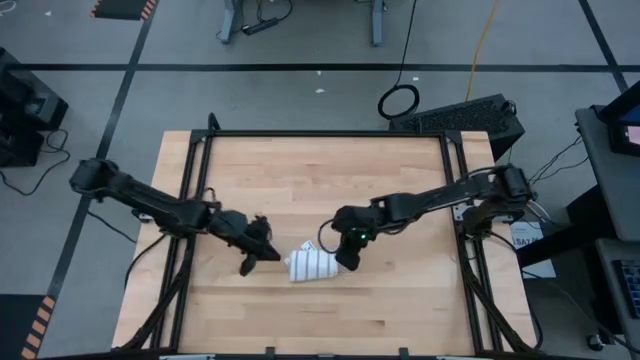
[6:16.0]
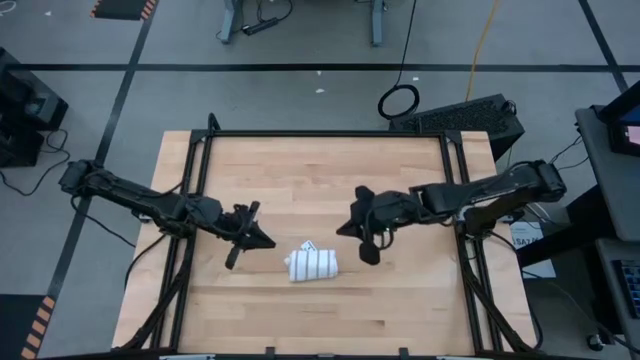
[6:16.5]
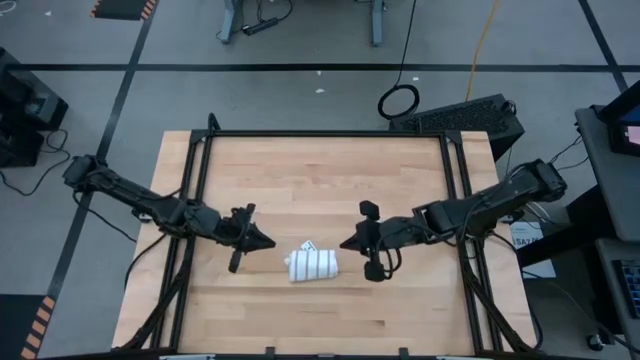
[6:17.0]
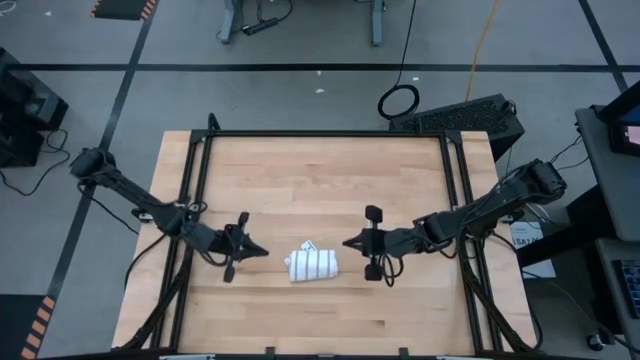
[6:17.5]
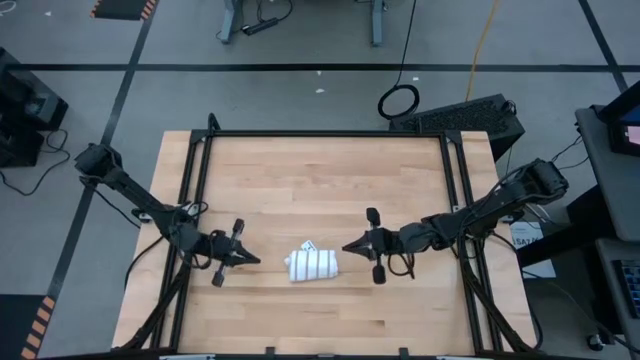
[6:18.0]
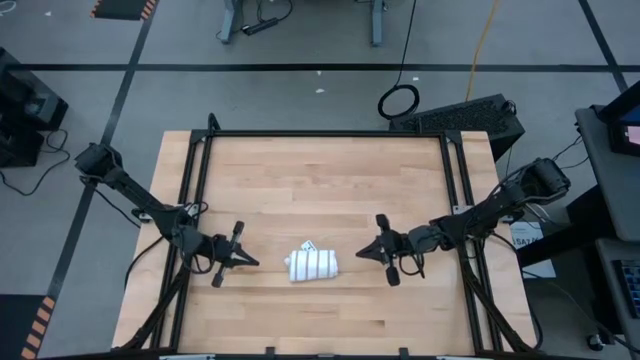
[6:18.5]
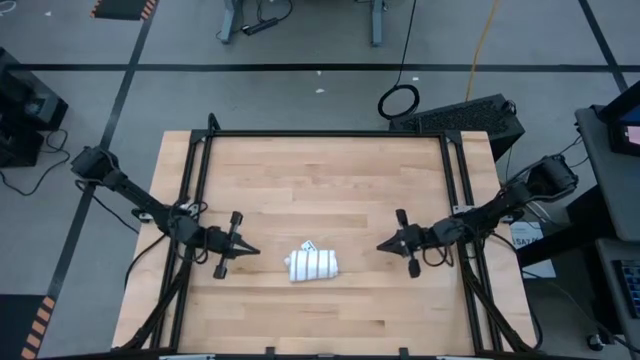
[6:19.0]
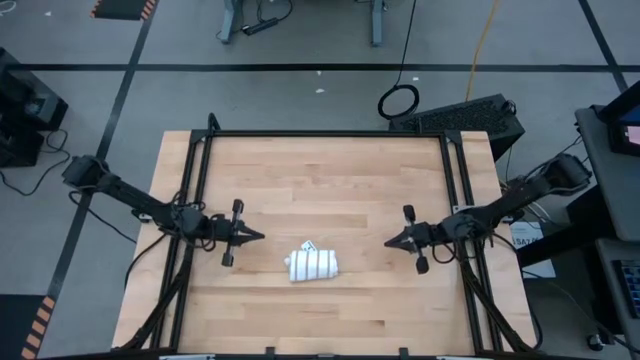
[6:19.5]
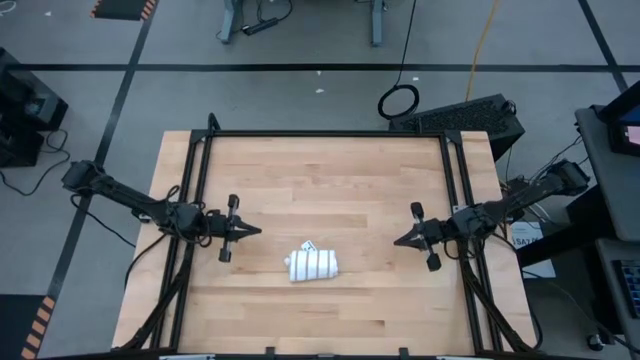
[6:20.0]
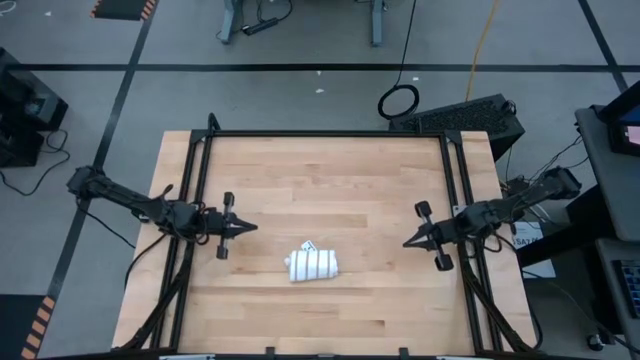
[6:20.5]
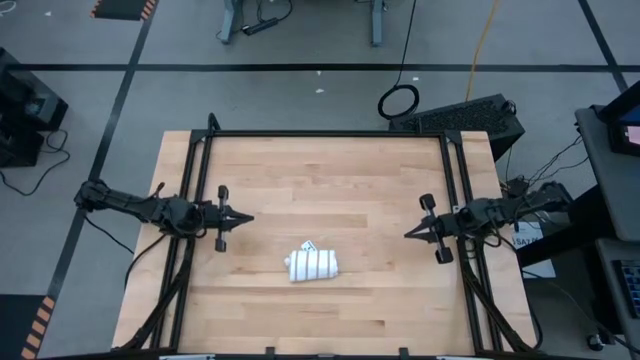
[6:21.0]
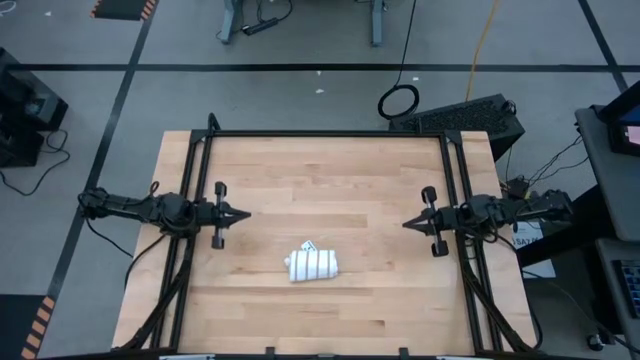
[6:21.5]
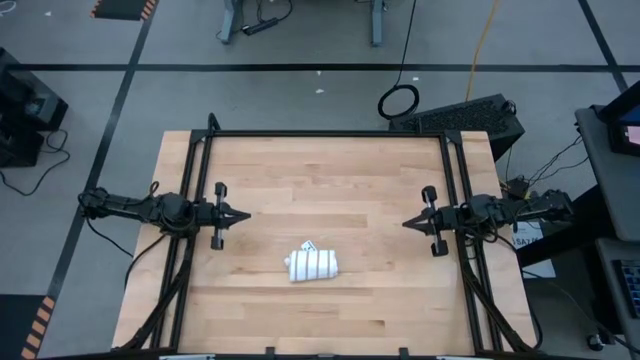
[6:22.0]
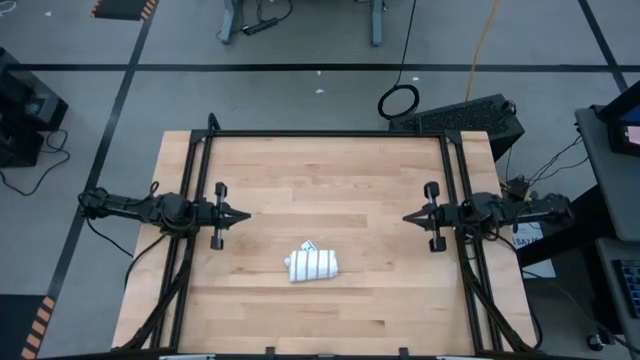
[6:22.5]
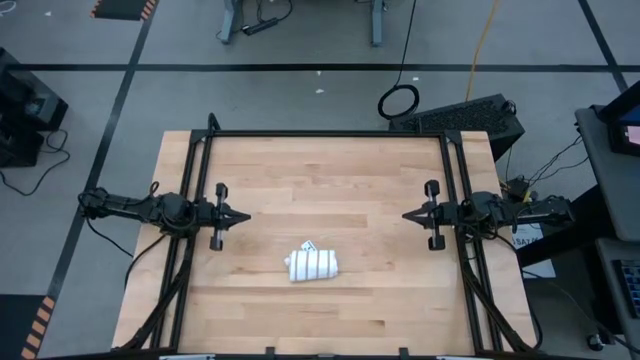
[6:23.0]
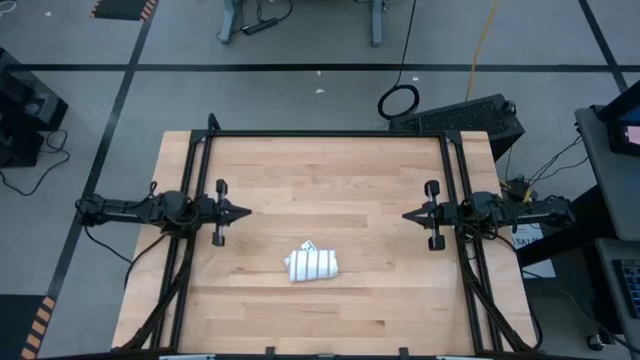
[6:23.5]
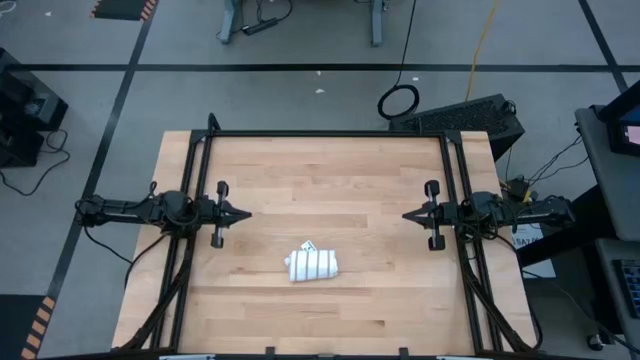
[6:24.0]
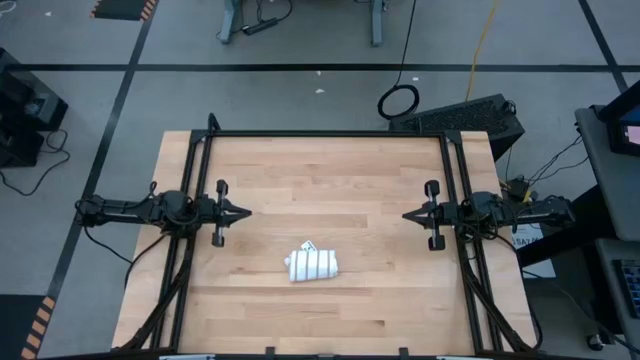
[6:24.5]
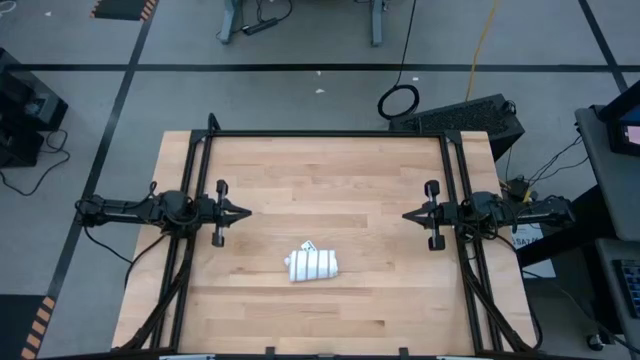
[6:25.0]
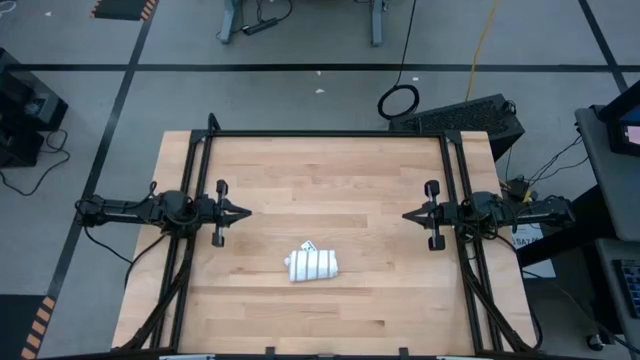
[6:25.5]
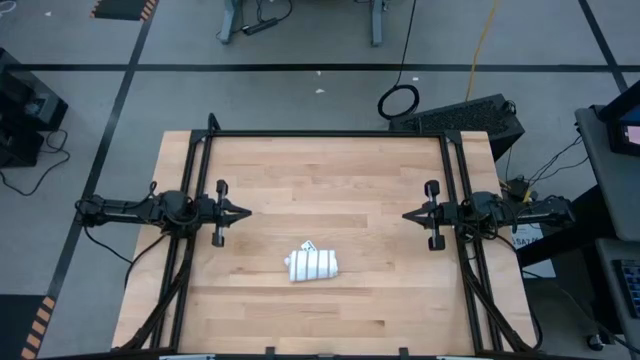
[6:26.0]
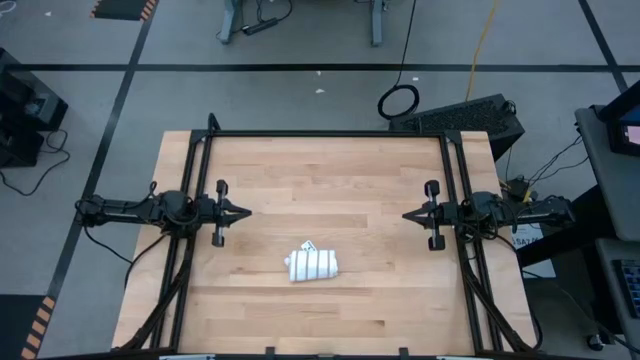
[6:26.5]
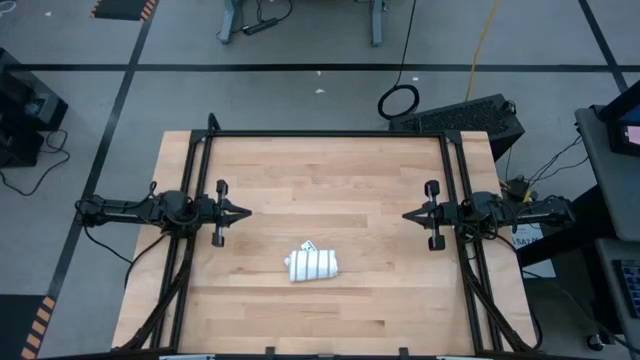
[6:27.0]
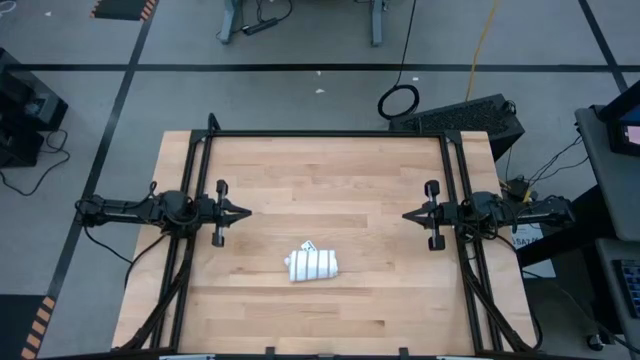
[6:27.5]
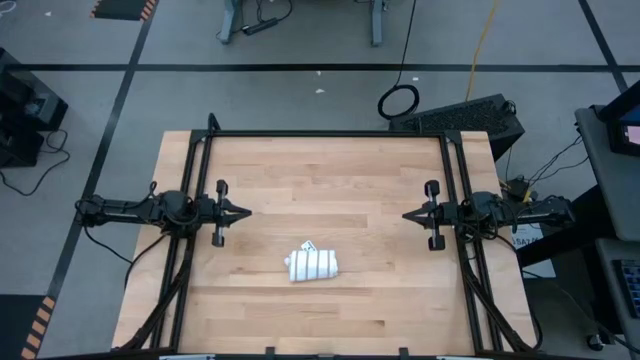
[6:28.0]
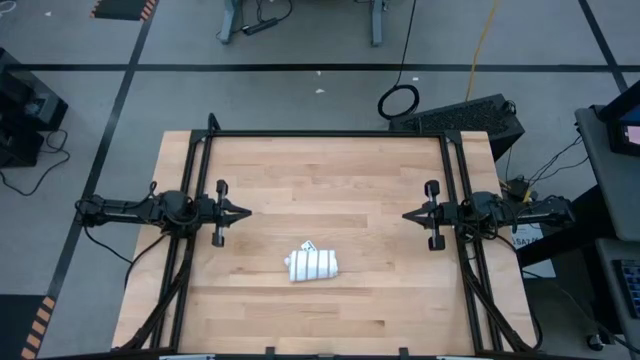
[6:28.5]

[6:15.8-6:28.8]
Task: Roll towel into tight, uniform cylinder
Return to Home Position

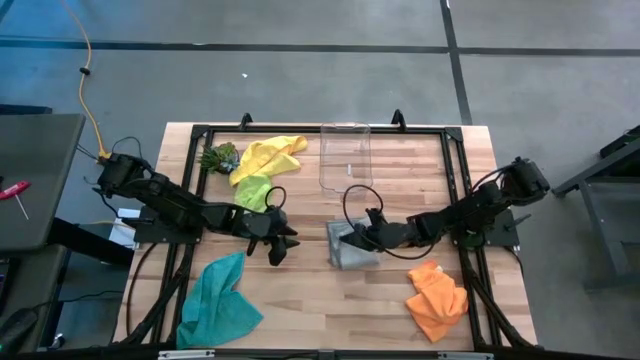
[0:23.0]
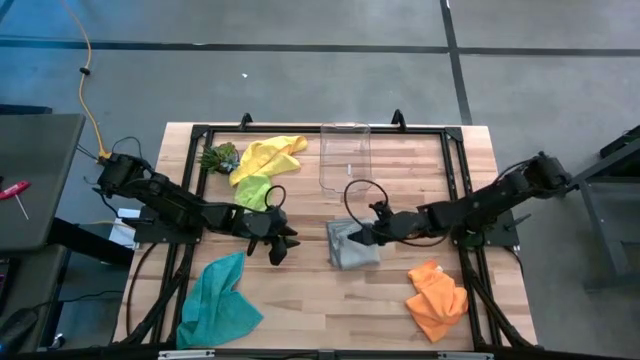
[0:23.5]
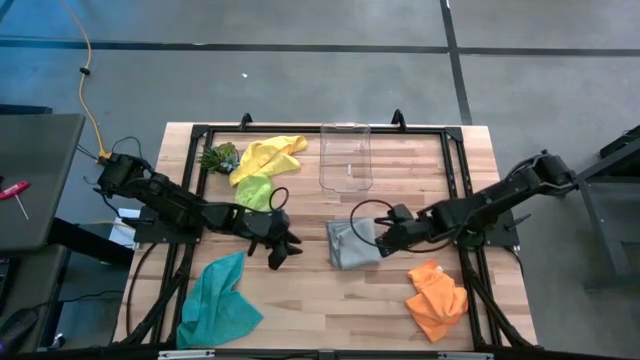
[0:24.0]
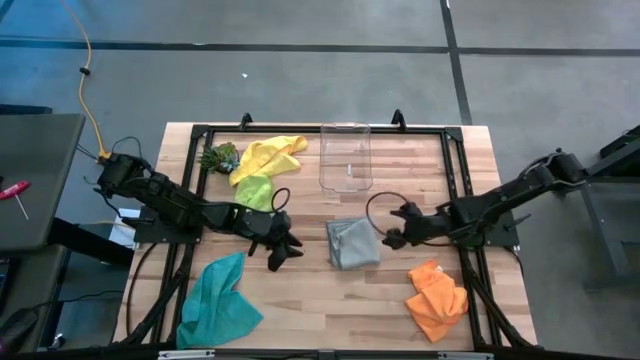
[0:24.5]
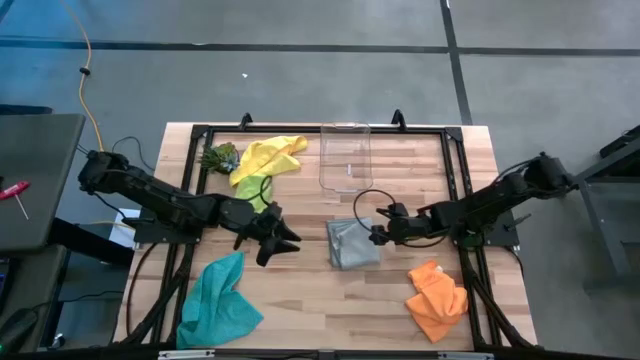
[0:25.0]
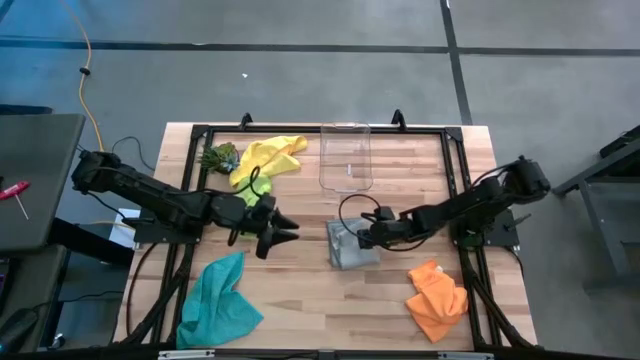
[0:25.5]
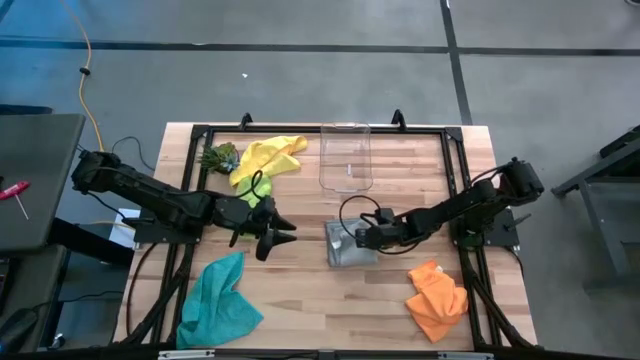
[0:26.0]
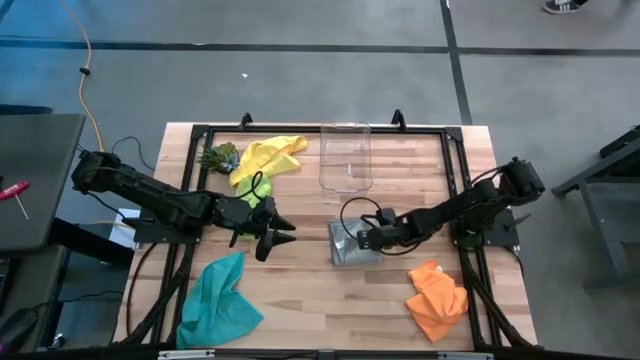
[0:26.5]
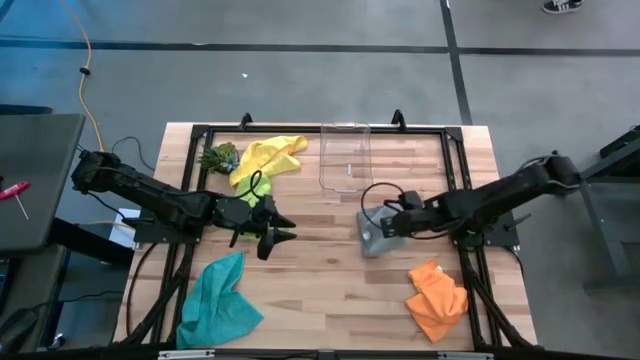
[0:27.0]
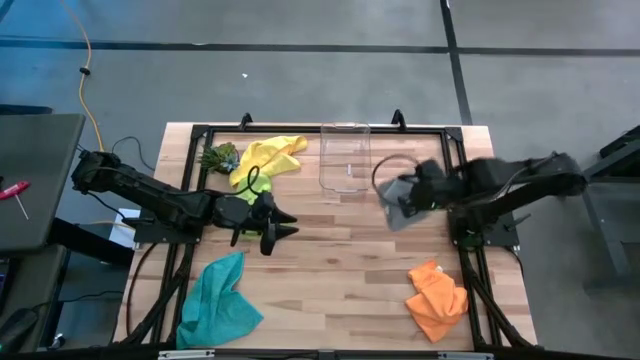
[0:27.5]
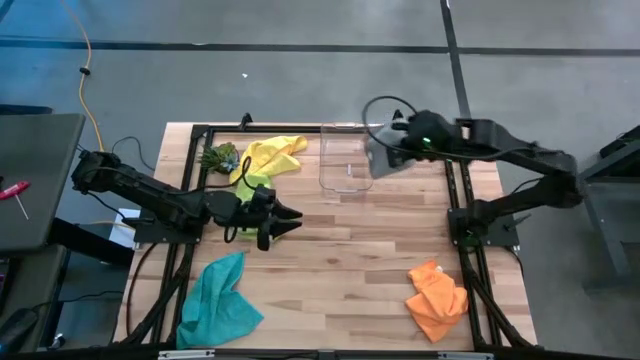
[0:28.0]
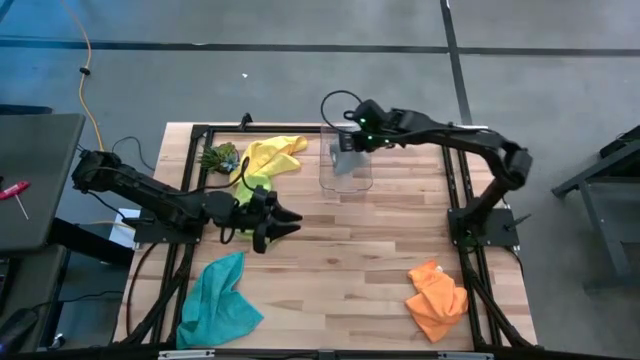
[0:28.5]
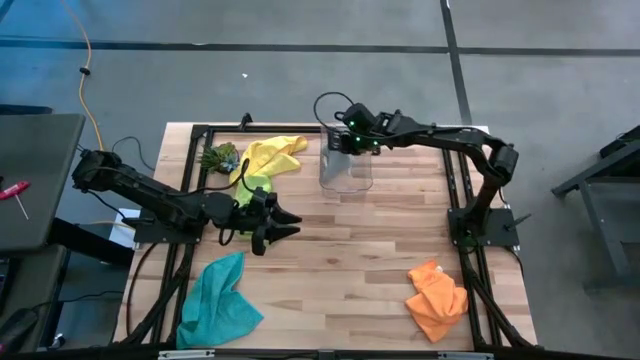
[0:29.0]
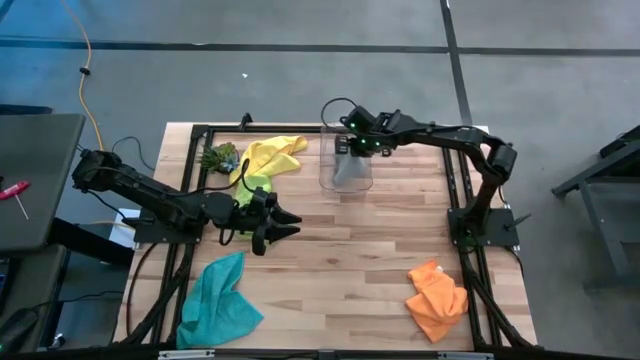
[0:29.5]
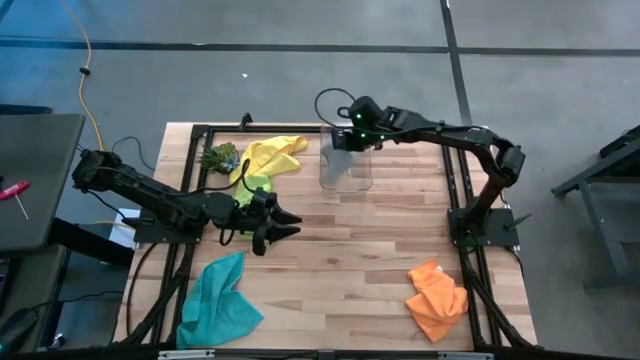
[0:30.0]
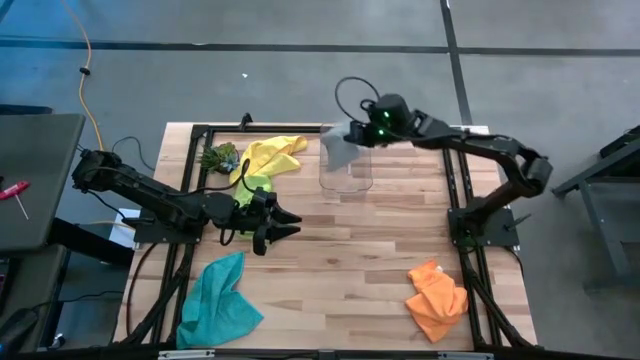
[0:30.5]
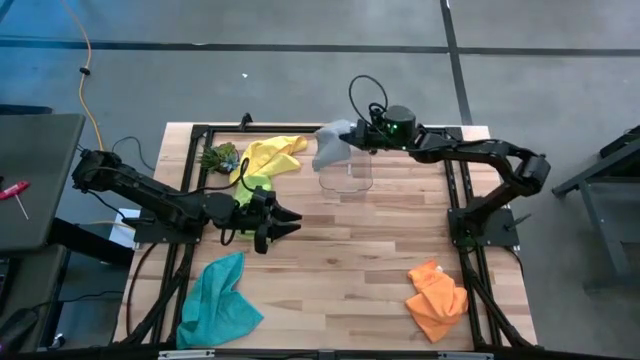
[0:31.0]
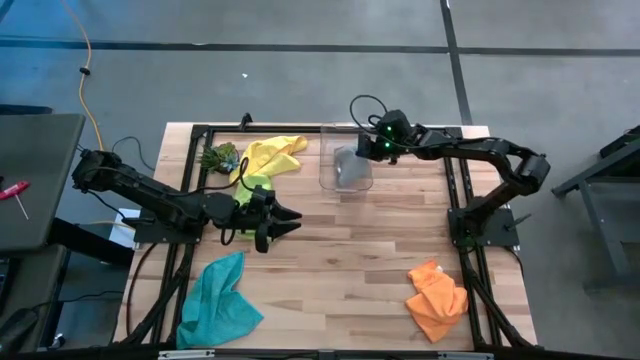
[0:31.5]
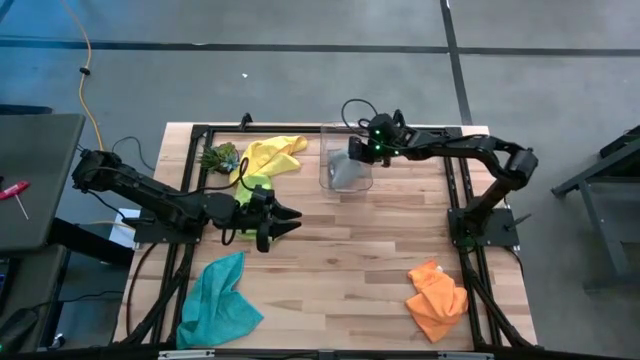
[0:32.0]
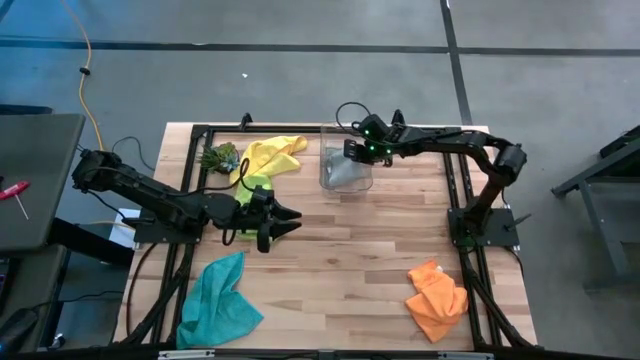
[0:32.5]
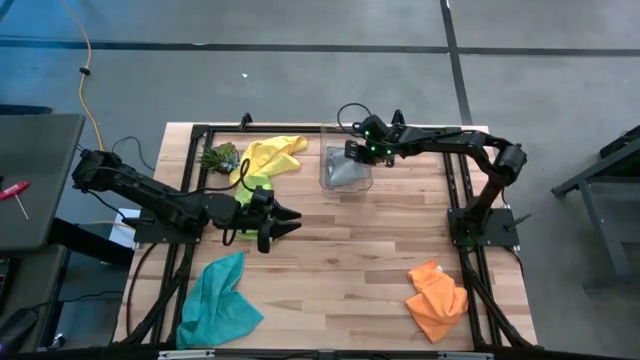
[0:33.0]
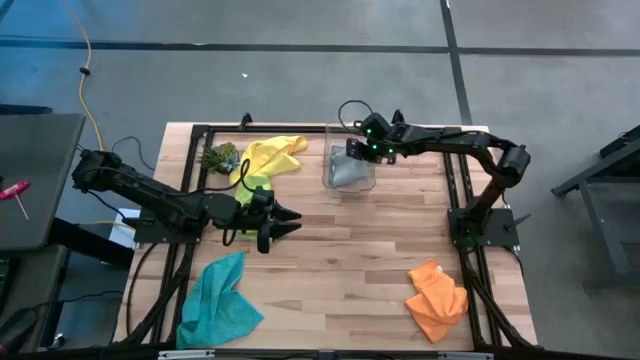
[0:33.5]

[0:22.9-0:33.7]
Task: Fold microfiber towels
Put the gray microfiber cloth into the transparent bin
